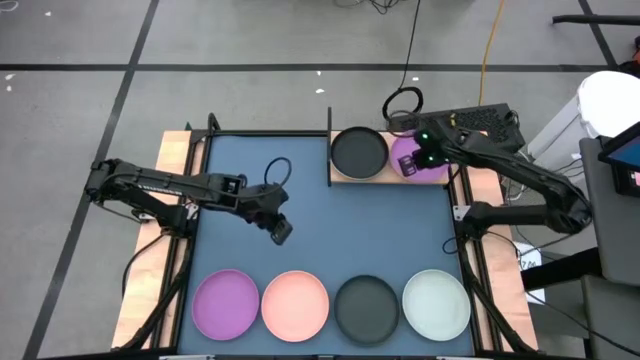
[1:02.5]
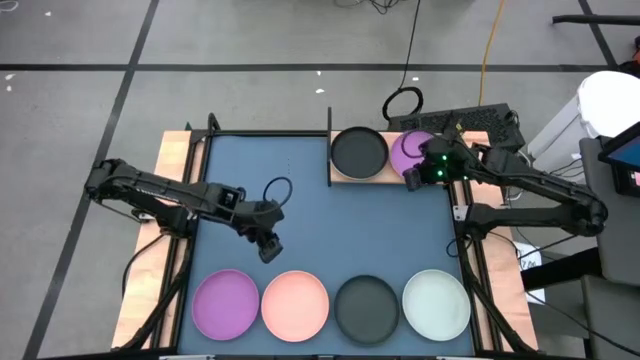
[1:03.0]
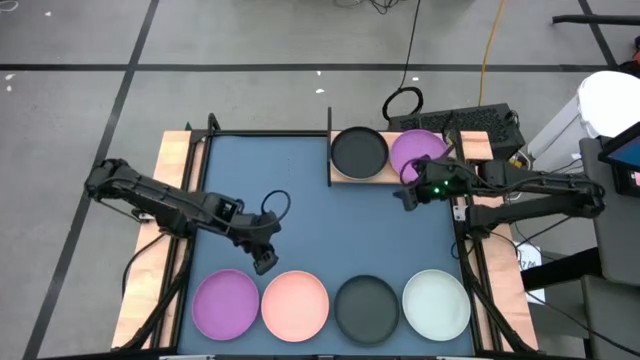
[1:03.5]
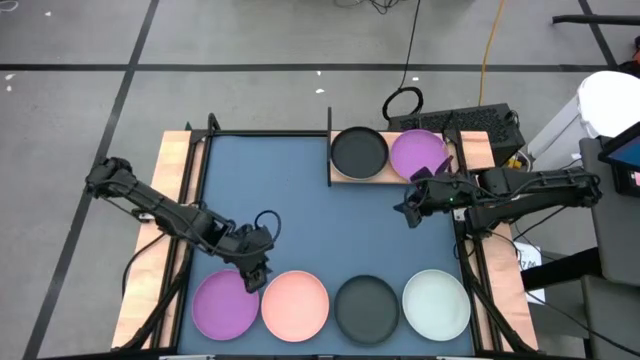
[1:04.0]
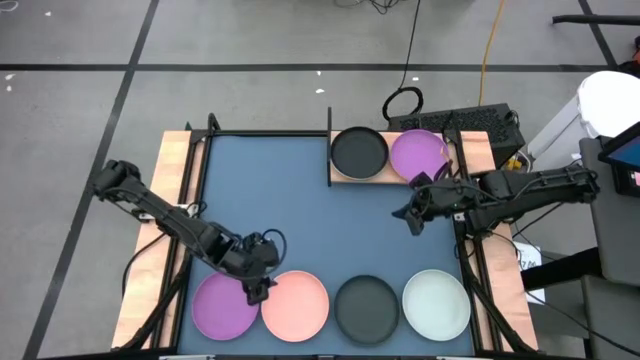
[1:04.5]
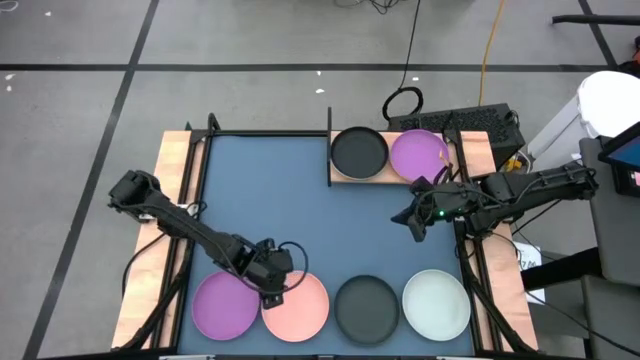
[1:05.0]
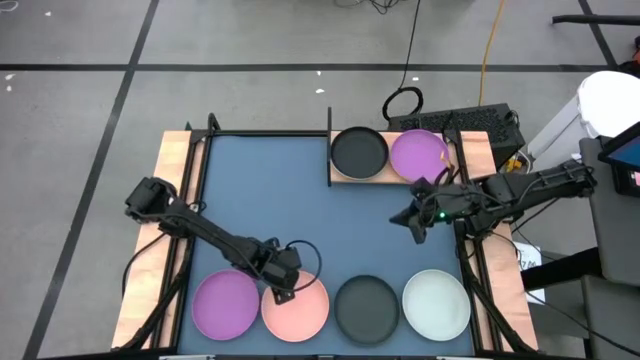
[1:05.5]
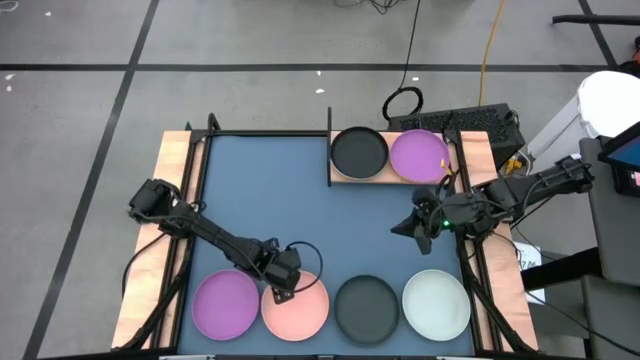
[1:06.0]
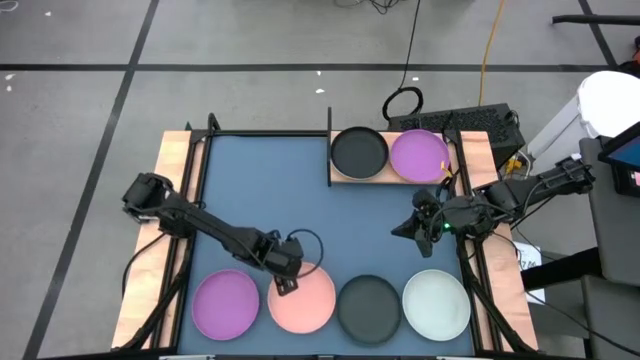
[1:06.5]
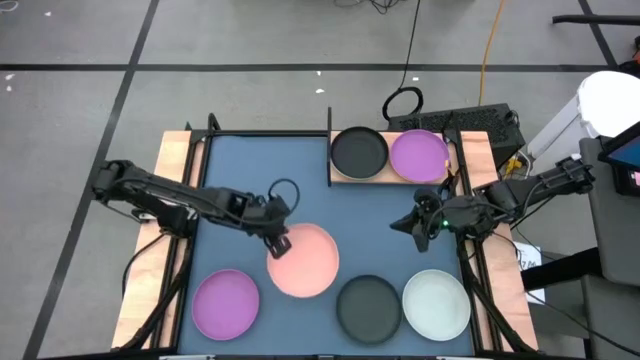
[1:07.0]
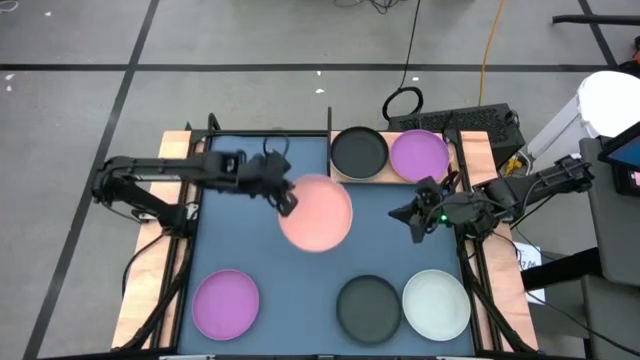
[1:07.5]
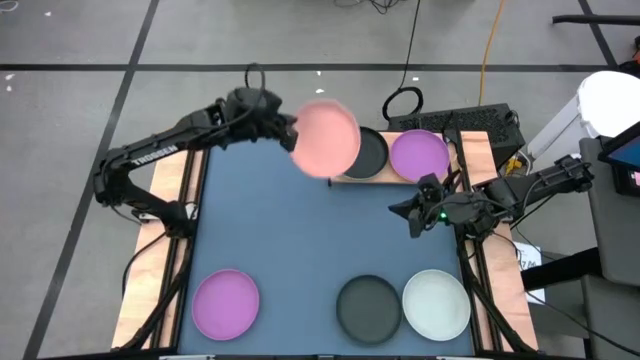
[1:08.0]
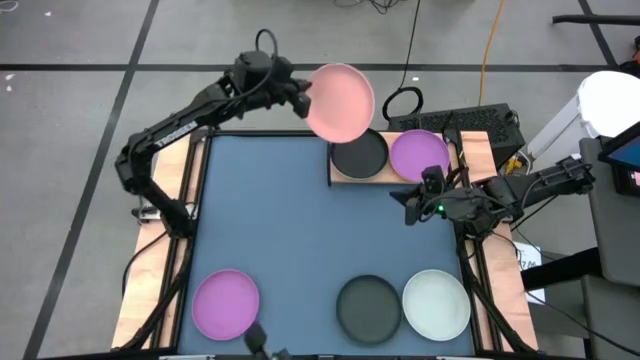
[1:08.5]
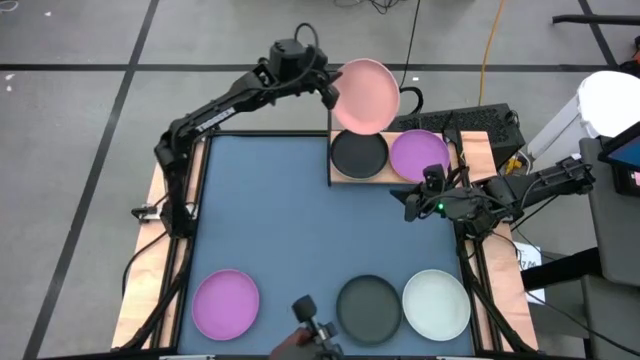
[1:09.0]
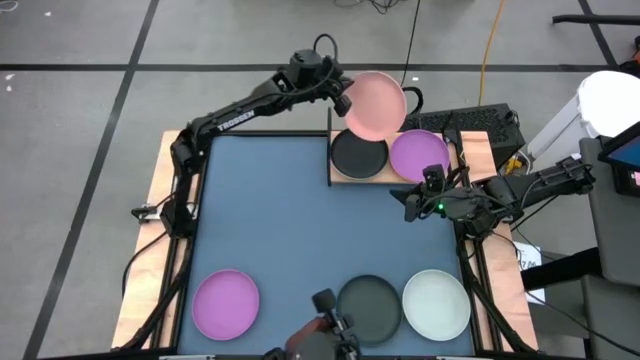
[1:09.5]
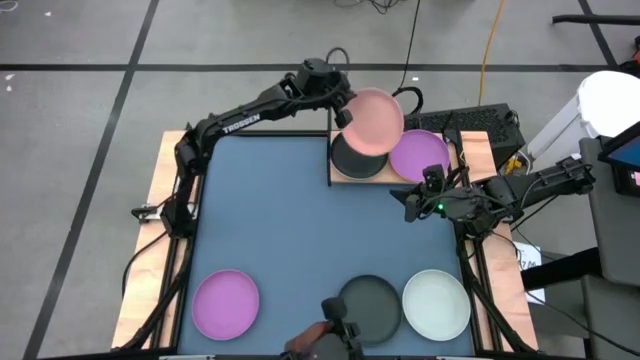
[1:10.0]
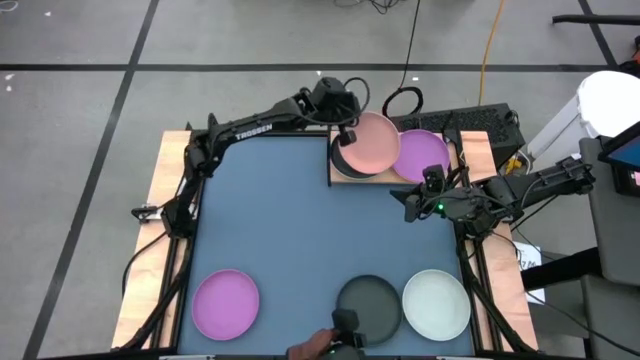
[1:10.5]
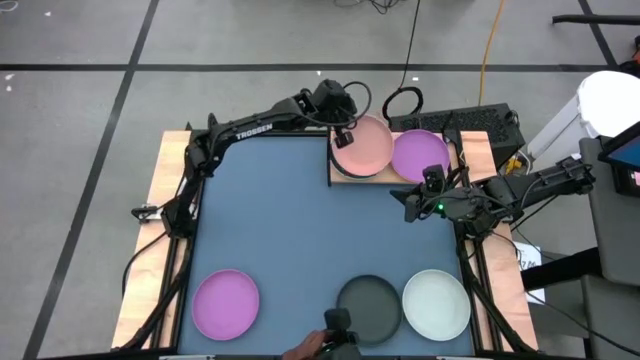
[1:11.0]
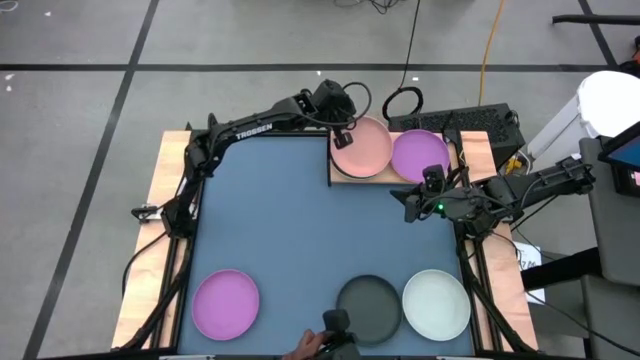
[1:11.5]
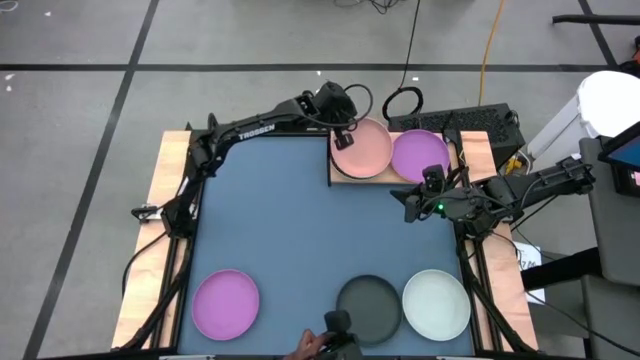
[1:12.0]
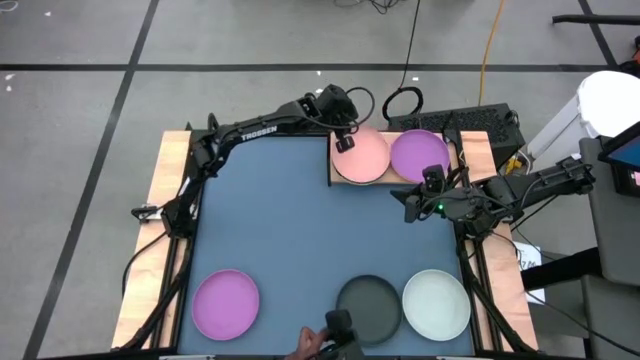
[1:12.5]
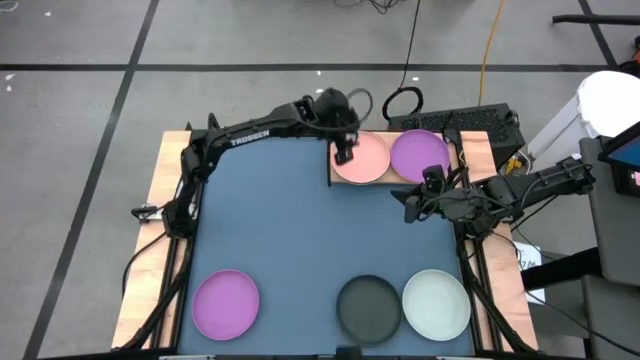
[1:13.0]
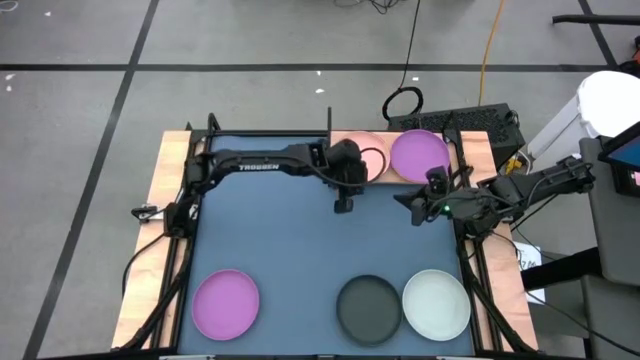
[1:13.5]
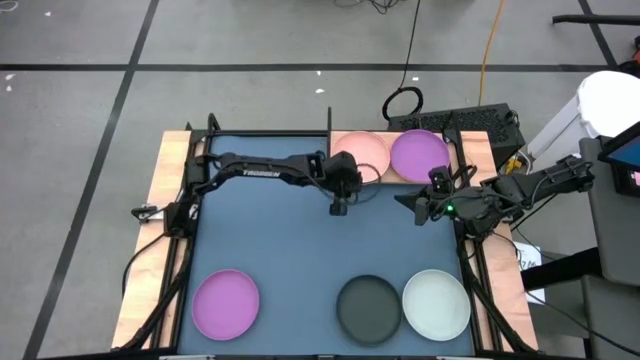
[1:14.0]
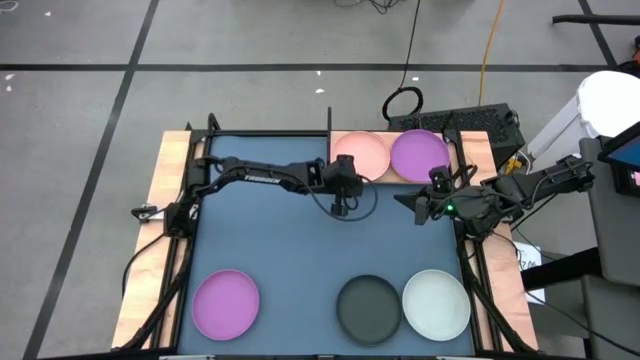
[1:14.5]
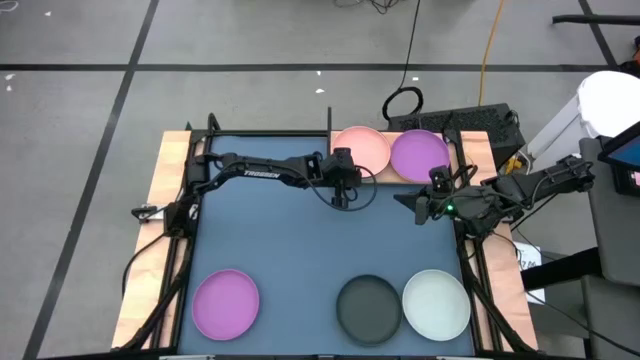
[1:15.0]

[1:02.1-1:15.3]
Task: Place and stack plates onto a shelf
Stack the orange plate on top of the black plate on the shelf

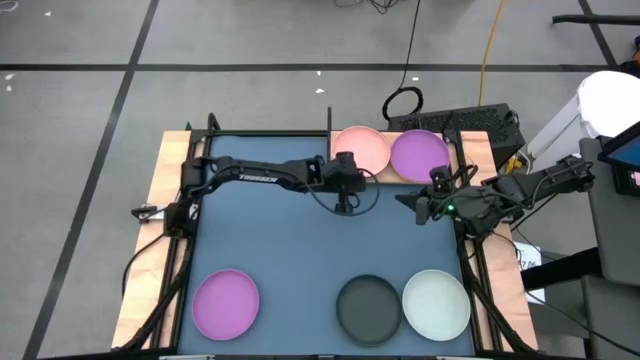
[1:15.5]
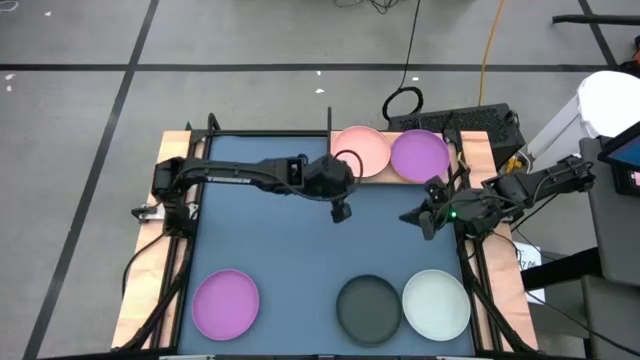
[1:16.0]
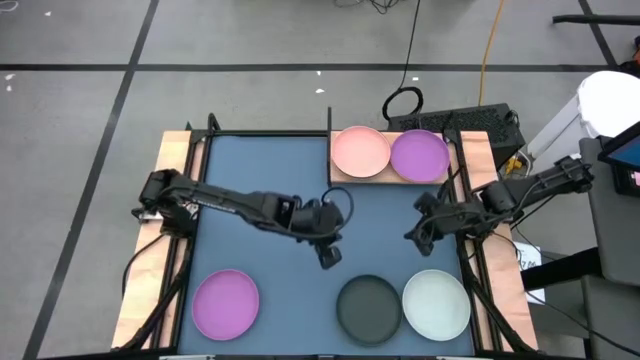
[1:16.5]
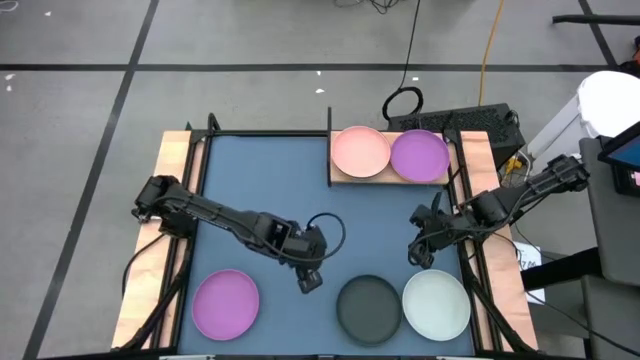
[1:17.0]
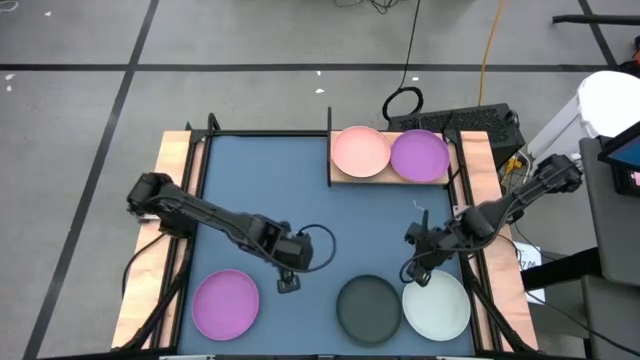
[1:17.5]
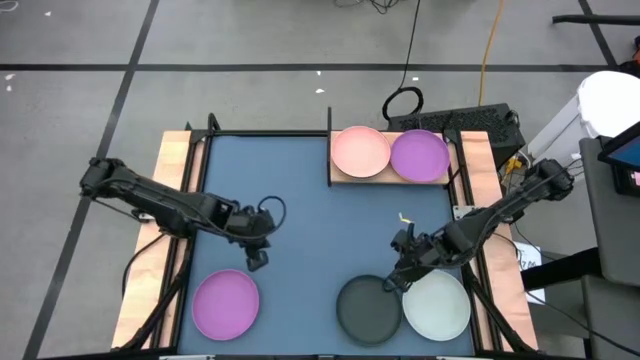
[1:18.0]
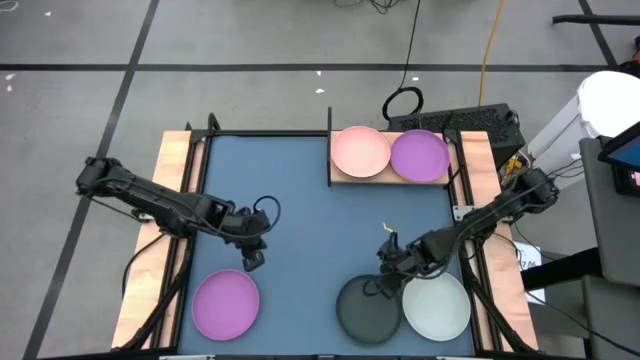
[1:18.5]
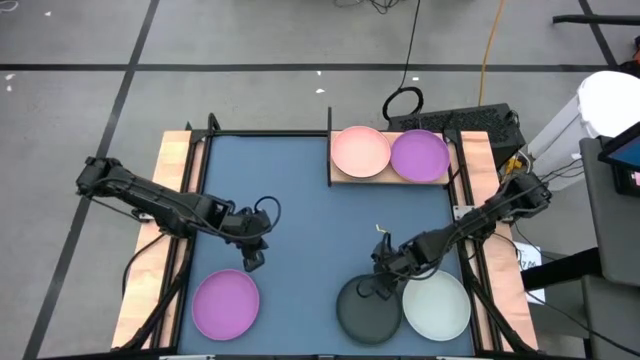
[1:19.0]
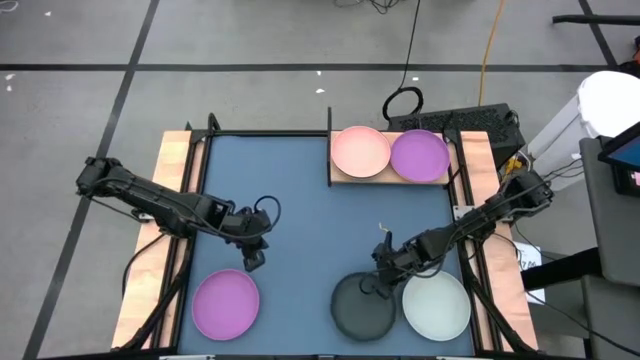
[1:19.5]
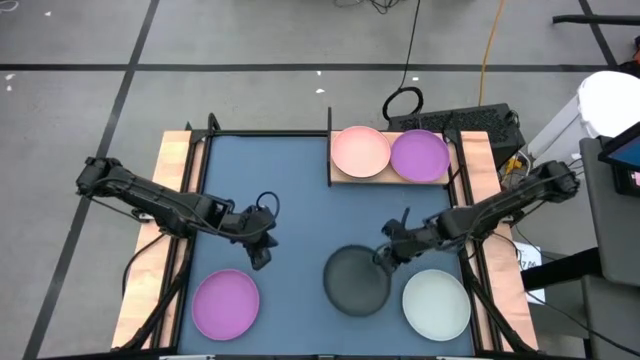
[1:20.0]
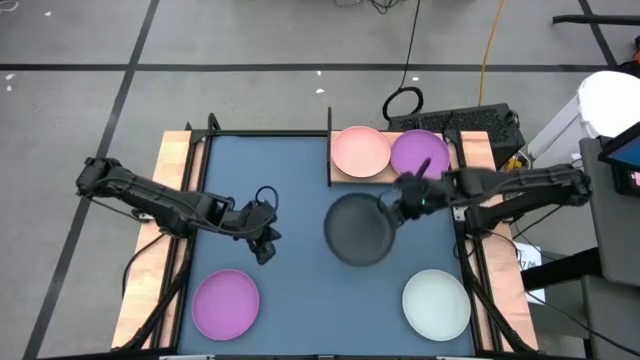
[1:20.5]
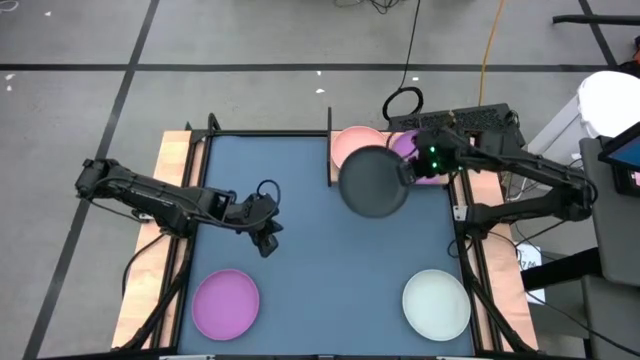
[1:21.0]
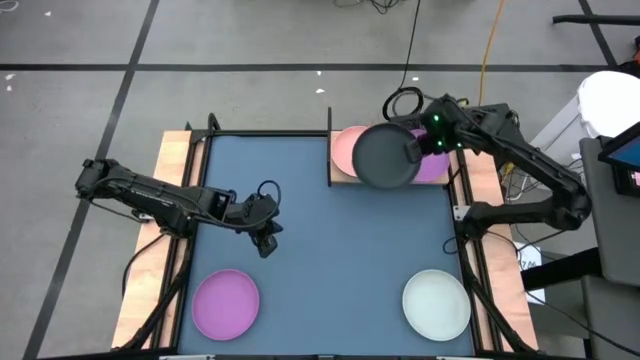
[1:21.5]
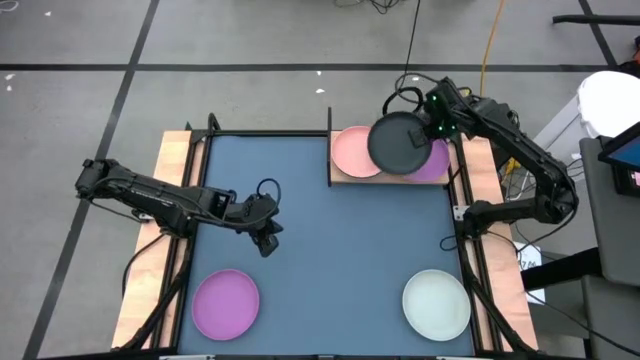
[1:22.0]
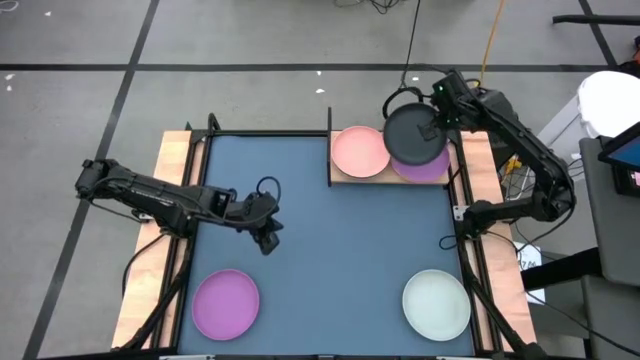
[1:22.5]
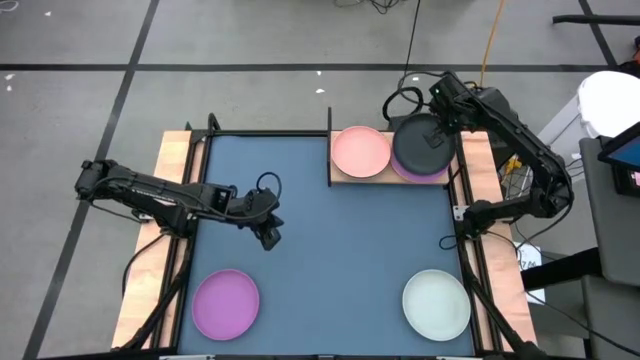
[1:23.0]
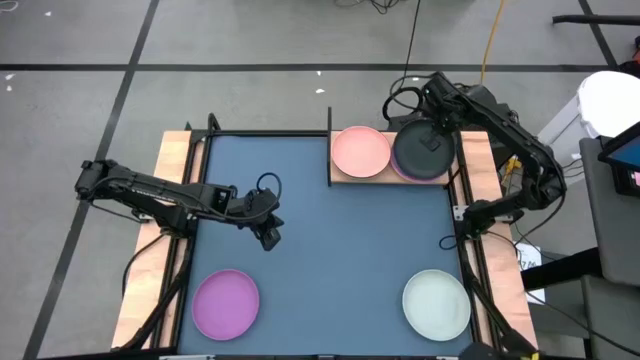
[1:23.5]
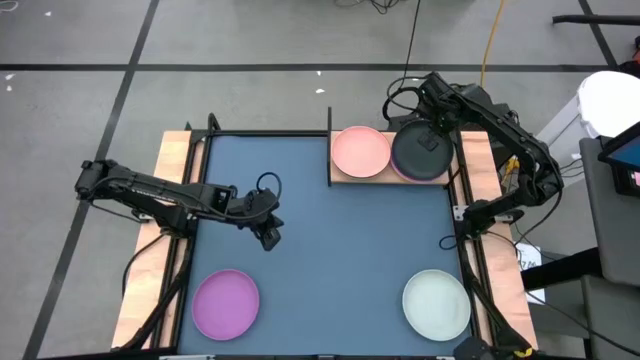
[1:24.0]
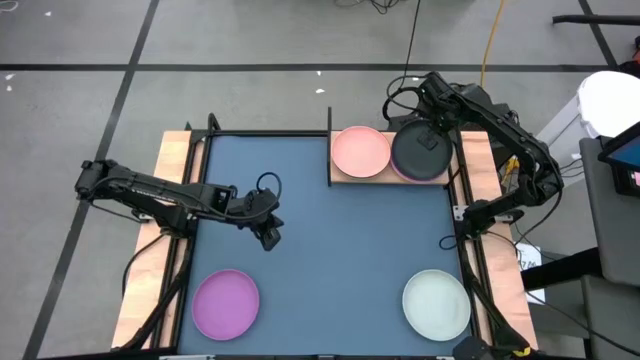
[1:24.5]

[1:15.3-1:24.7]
Stack the black plate on top of the purple plate on the shelf

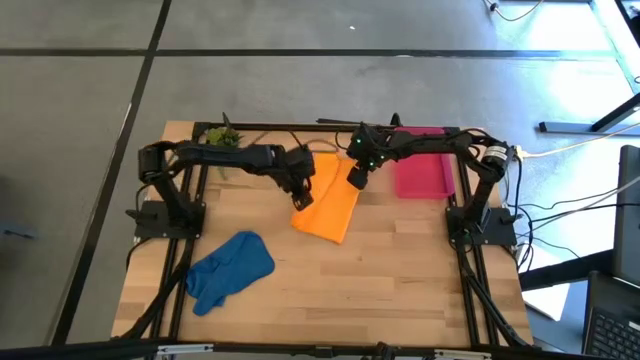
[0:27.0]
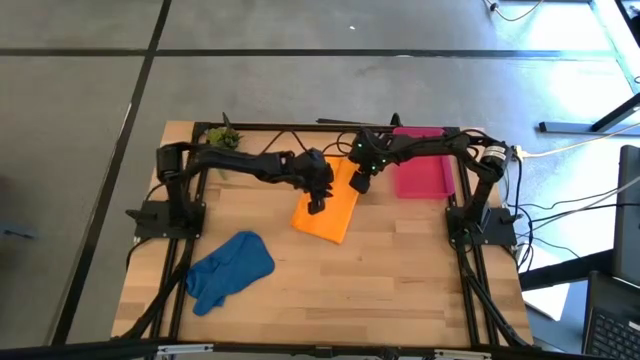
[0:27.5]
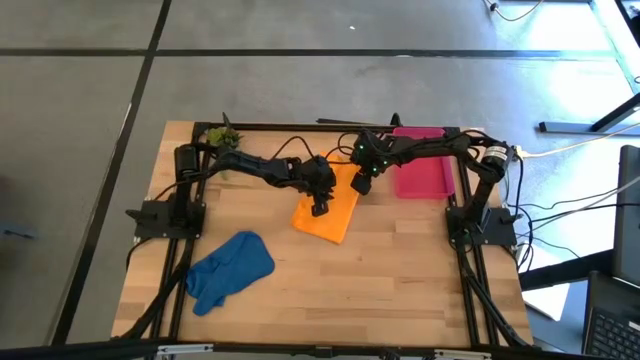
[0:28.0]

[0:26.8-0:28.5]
Task: Roll microfiber towels into tight, uniform cylinder then place into a basket
Fold the orange microfiber towel
